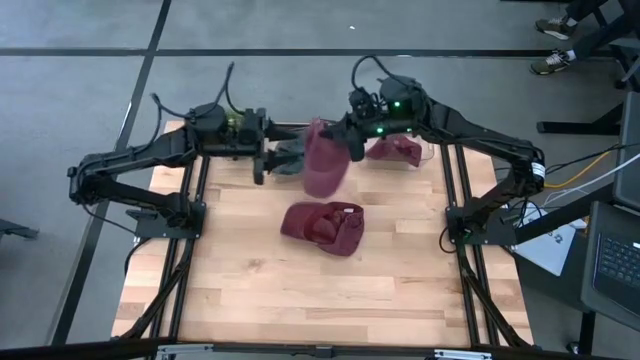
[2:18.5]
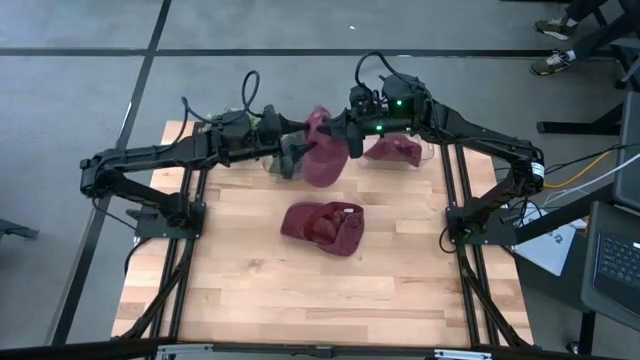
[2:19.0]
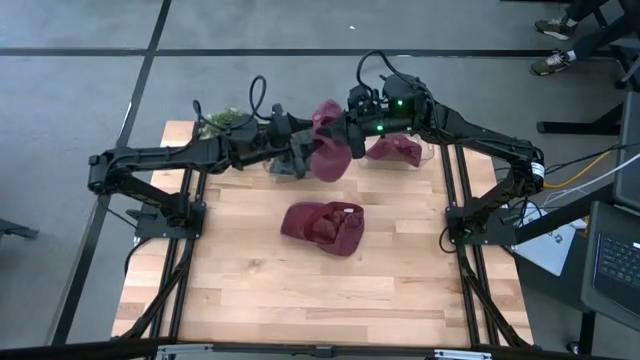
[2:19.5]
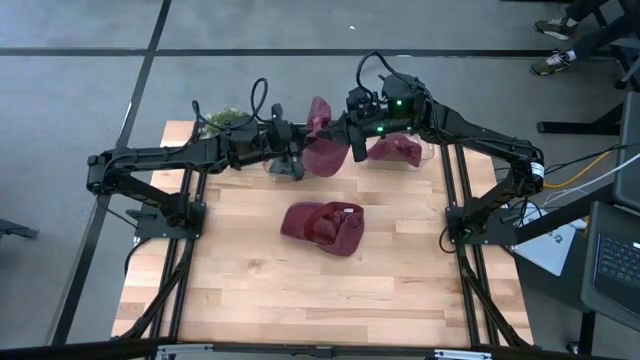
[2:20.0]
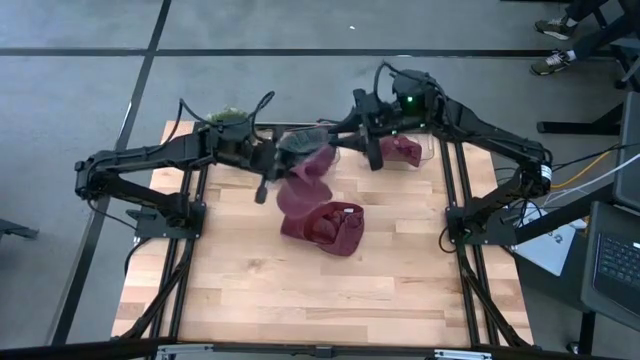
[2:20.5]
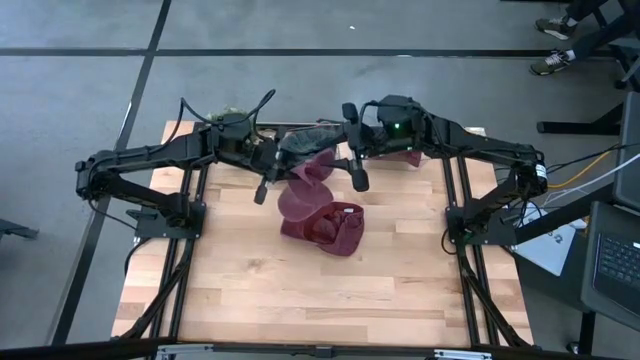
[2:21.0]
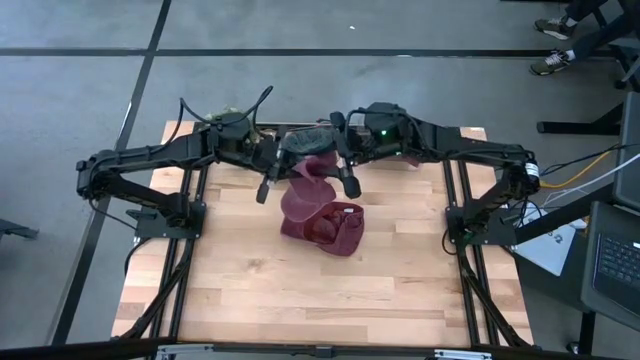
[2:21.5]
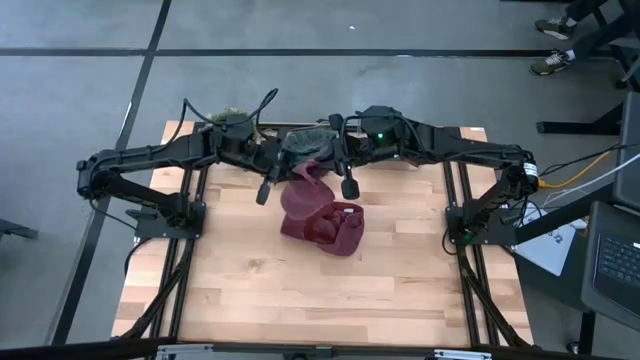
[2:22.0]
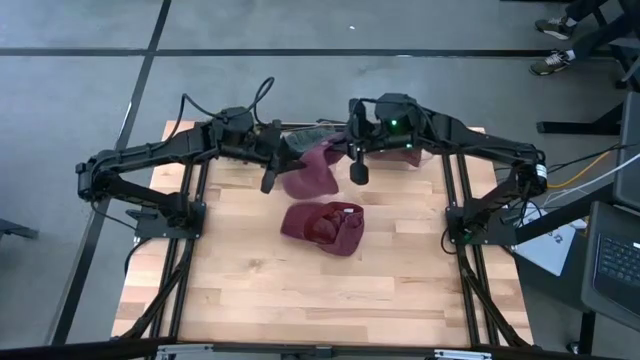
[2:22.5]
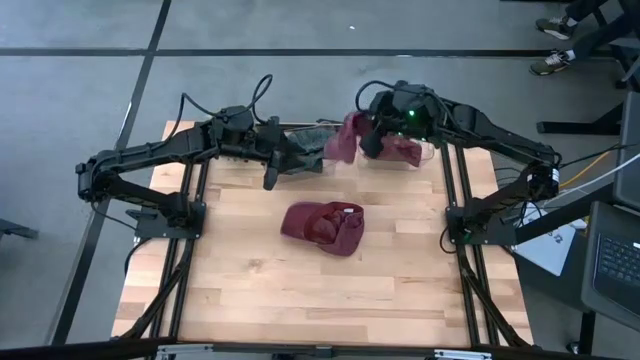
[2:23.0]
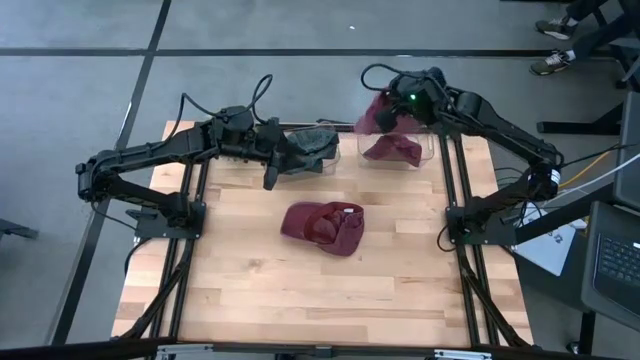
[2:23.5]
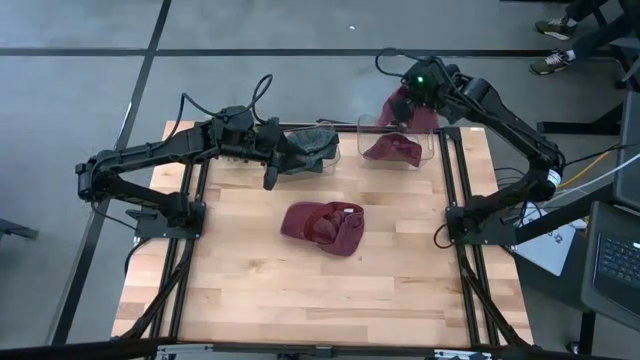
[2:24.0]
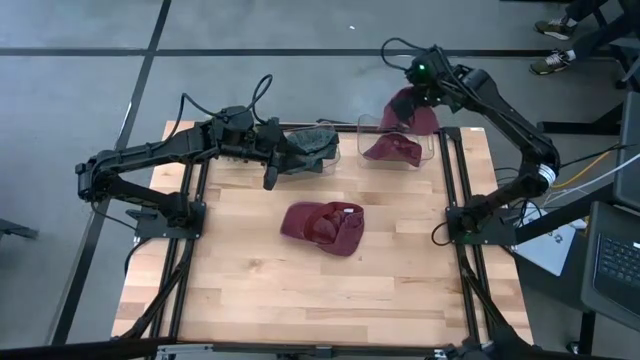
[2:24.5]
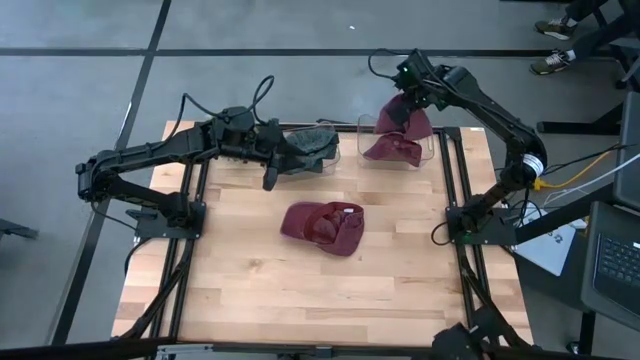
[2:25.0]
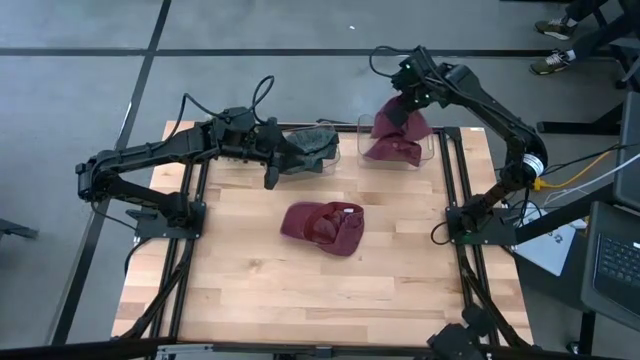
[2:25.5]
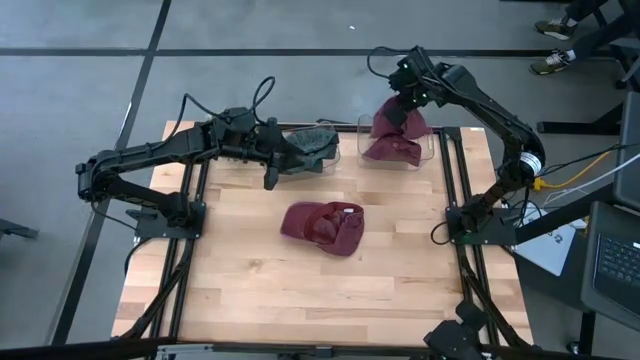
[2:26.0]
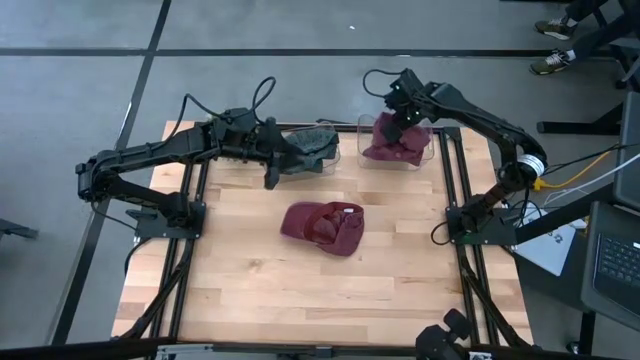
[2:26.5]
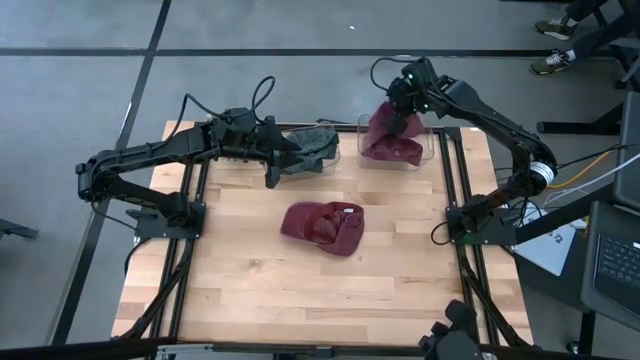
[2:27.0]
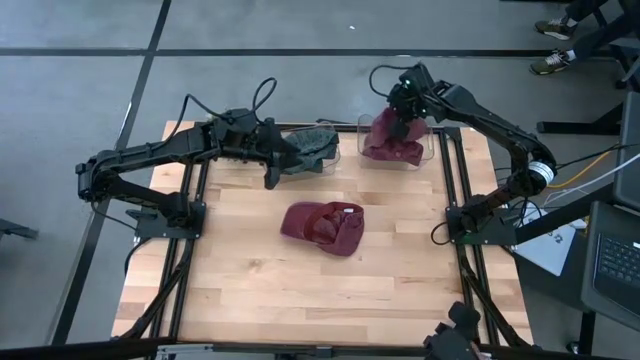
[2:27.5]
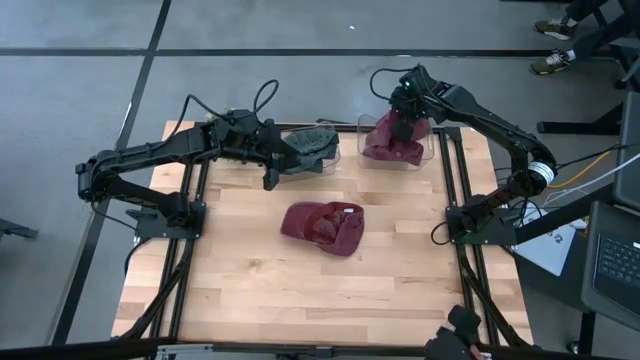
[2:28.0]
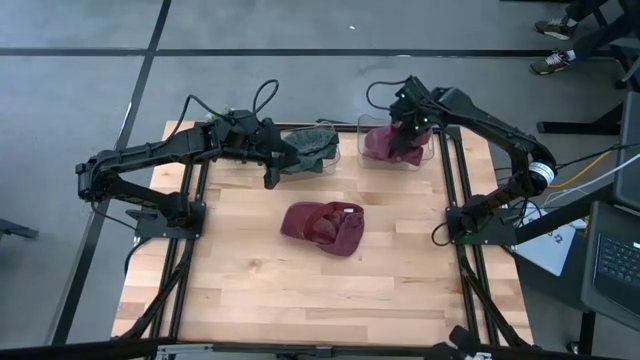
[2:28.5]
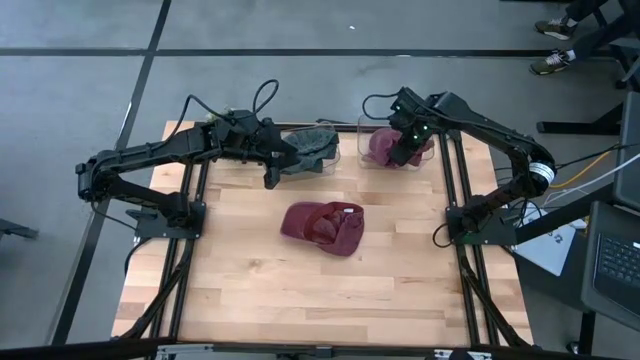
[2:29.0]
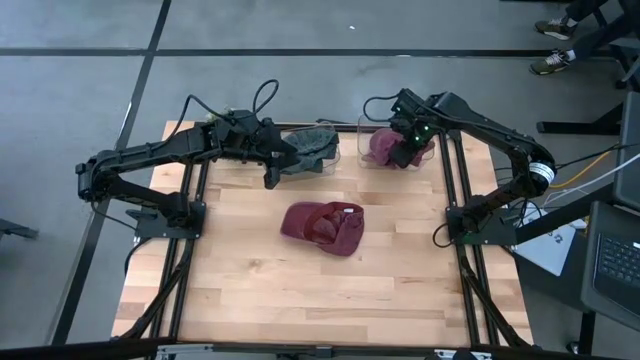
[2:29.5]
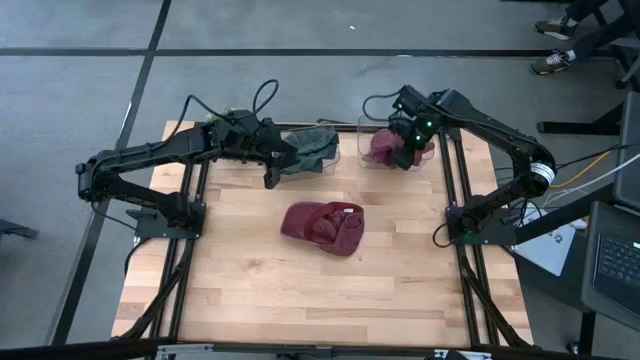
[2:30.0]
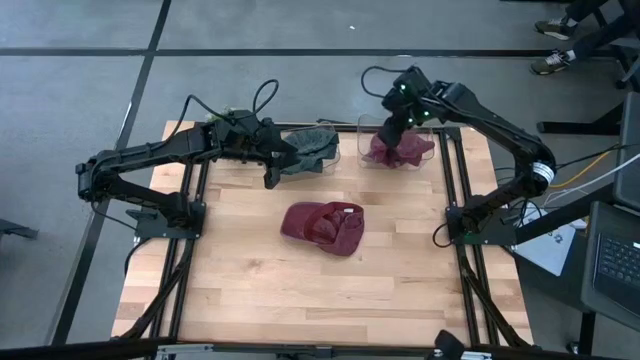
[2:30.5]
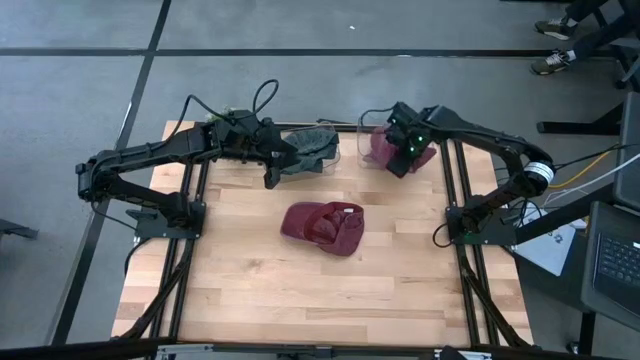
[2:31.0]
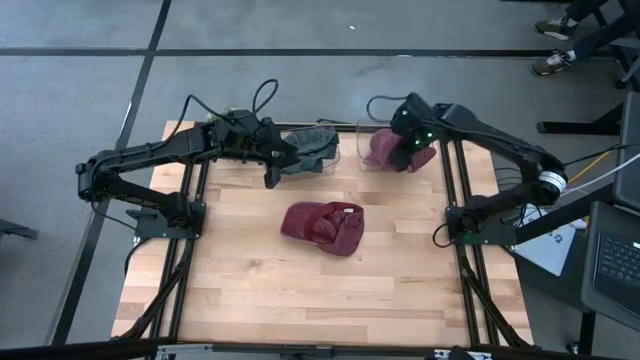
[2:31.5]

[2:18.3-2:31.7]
Task: Pick & Place hat
Put the bottom red cap on the red cap in the right transparent bin

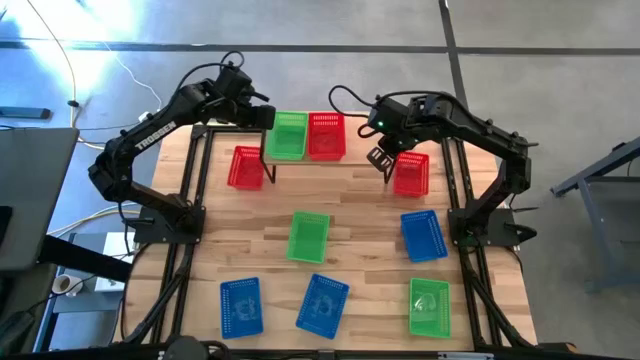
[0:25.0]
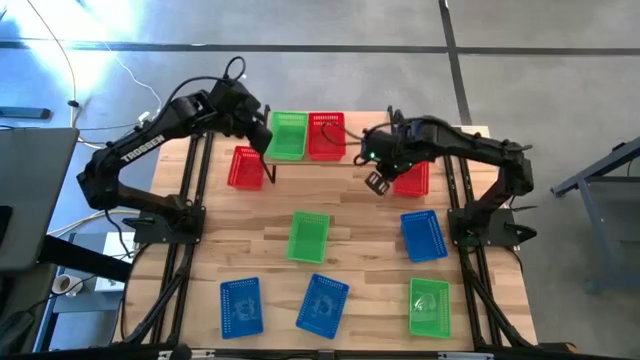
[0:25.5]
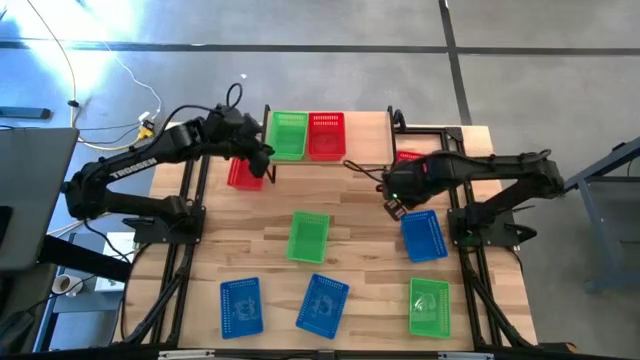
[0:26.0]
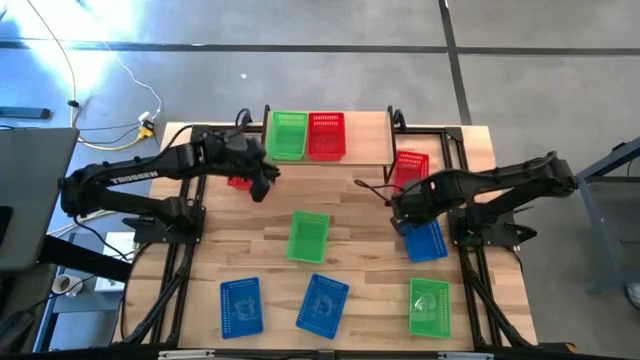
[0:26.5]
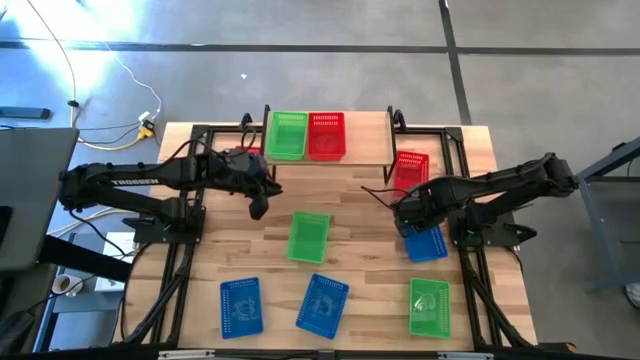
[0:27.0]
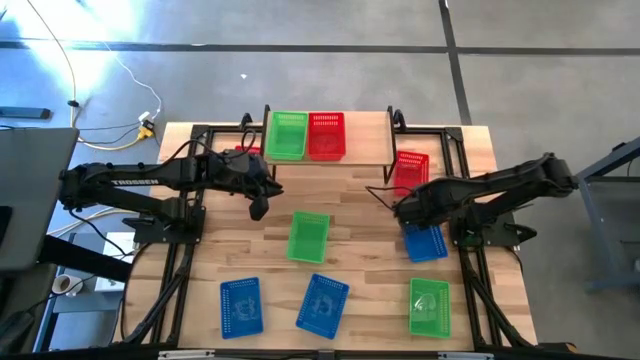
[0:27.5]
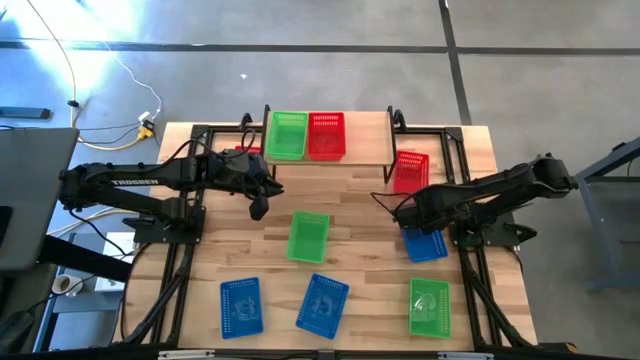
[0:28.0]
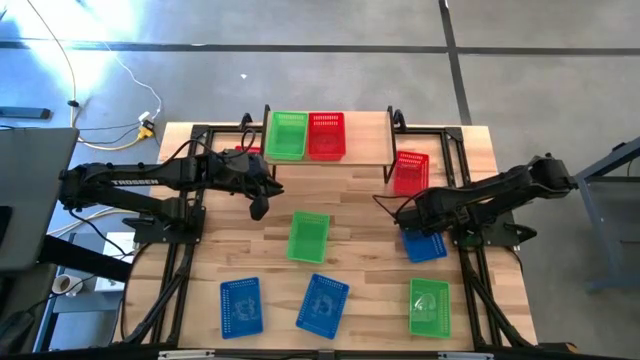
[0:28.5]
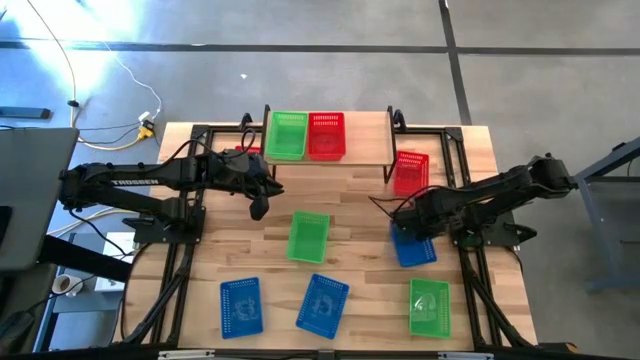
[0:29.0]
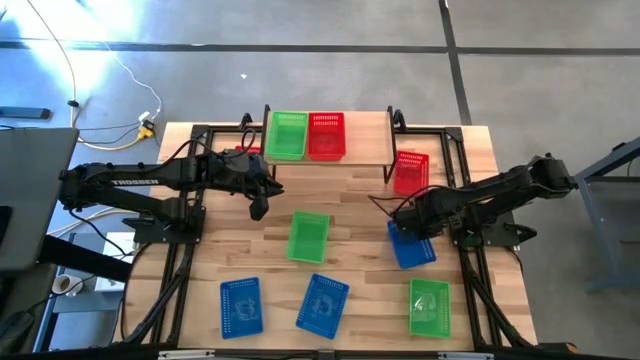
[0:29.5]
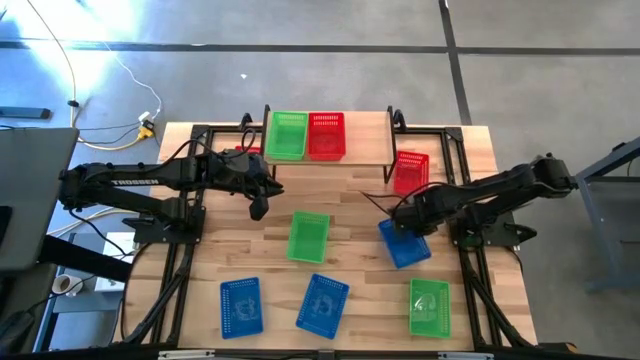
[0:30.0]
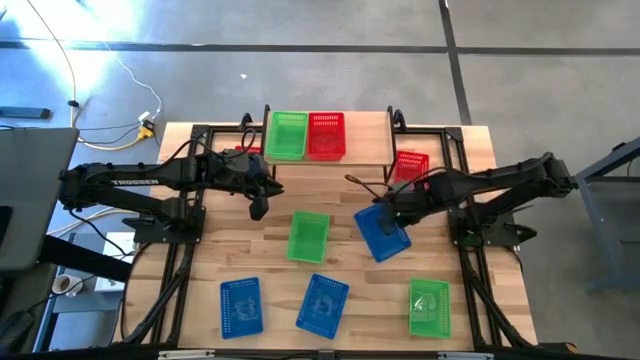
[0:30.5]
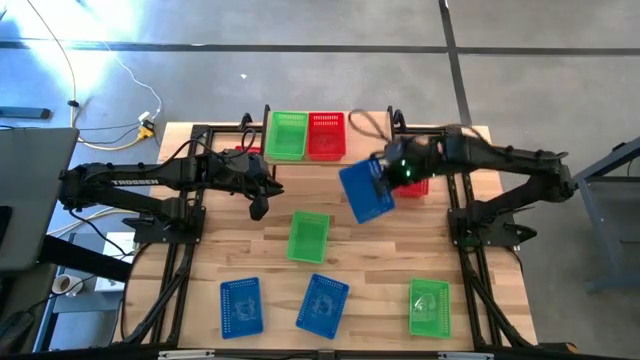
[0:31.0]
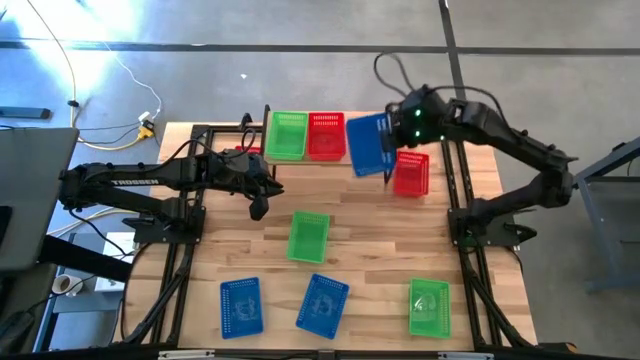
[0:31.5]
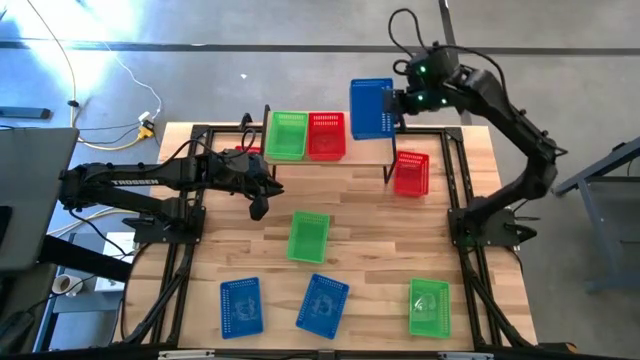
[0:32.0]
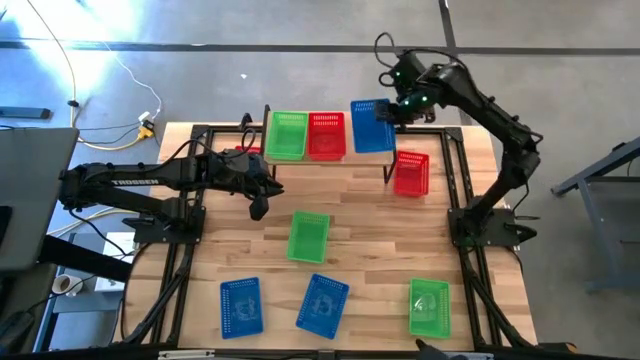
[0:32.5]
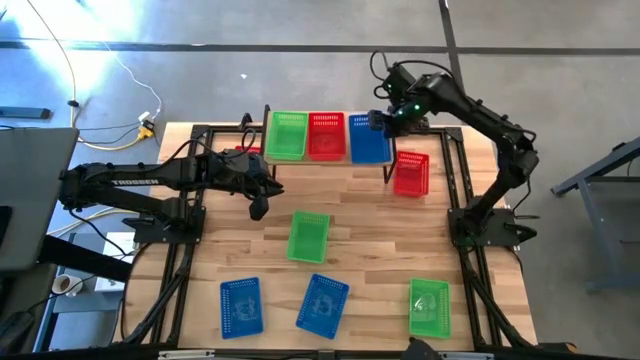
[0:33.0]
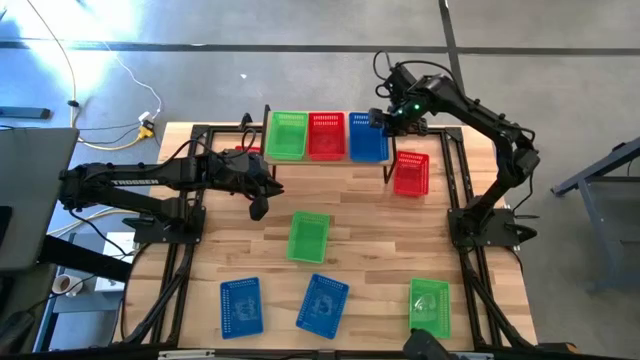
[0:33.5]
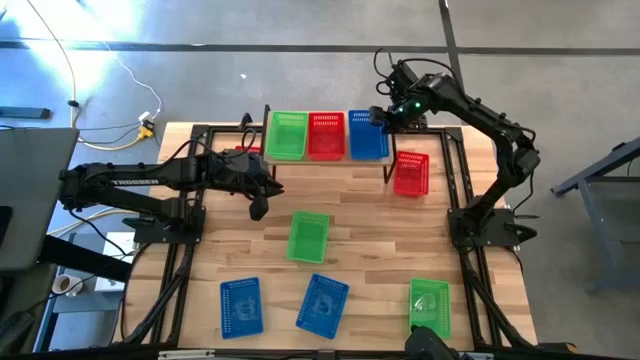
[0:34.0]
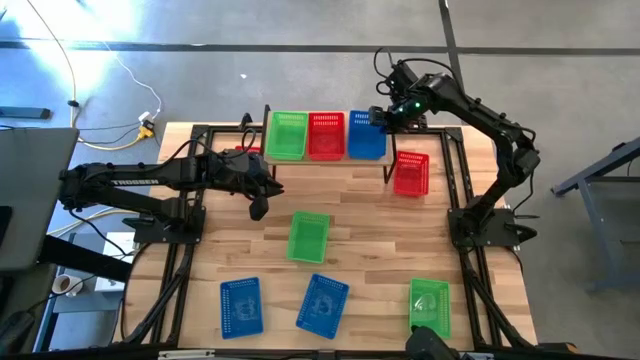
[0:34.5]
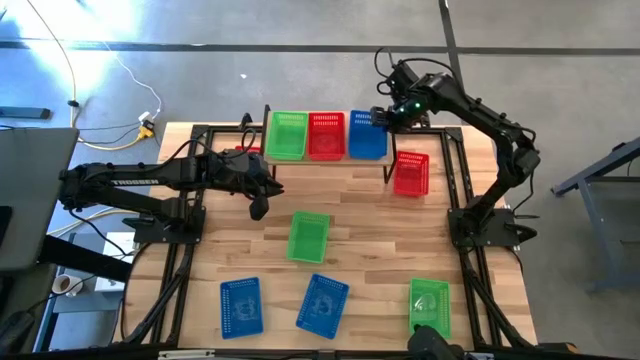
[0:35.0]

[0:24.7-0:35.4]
Task: Stack baskets on shelf by color
Put the top blue bin on the shelf
